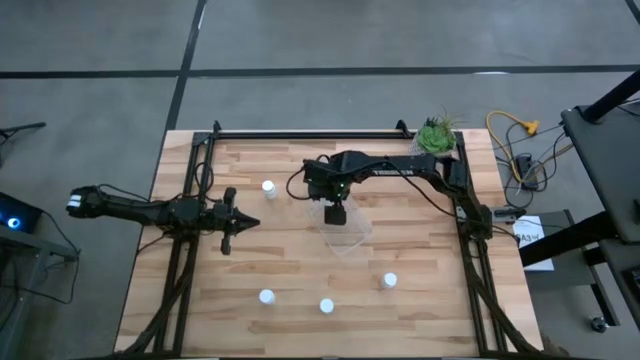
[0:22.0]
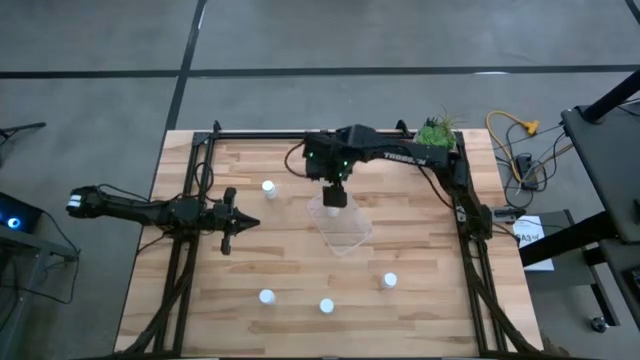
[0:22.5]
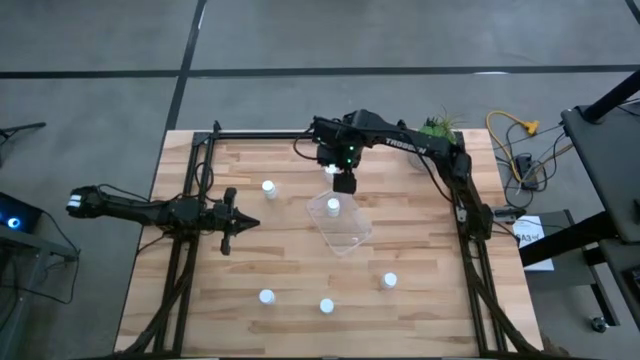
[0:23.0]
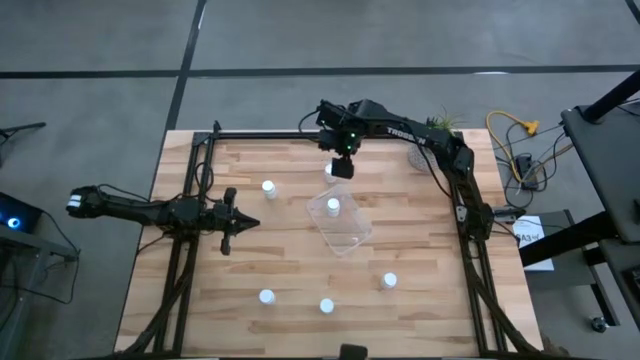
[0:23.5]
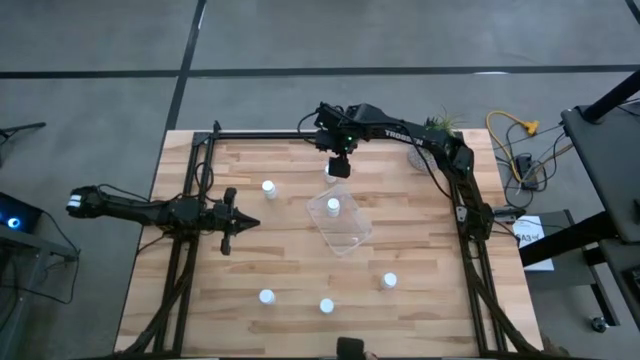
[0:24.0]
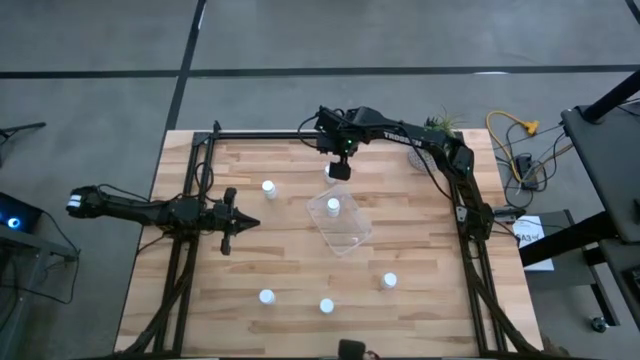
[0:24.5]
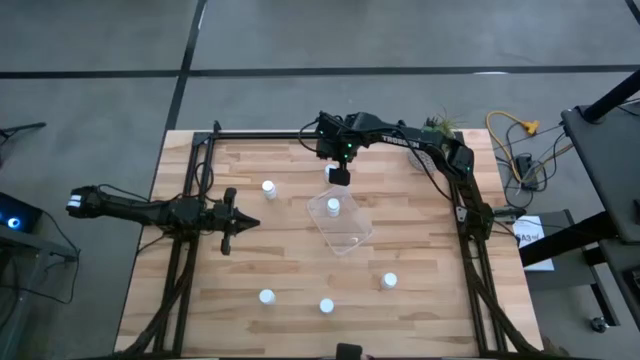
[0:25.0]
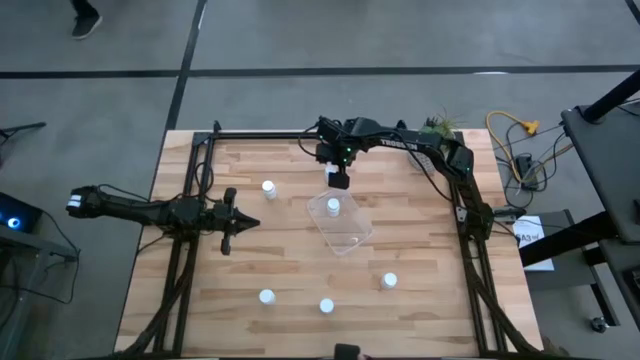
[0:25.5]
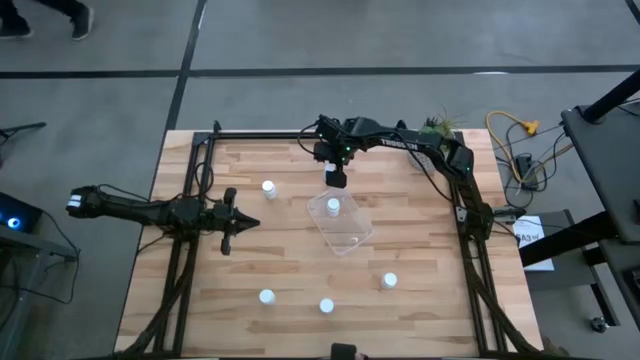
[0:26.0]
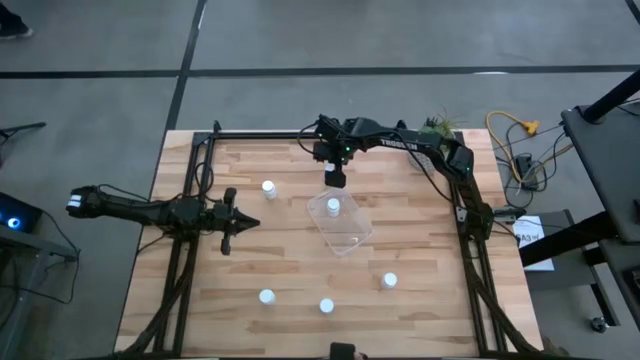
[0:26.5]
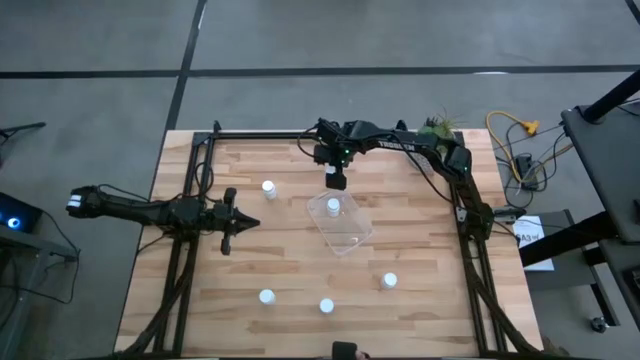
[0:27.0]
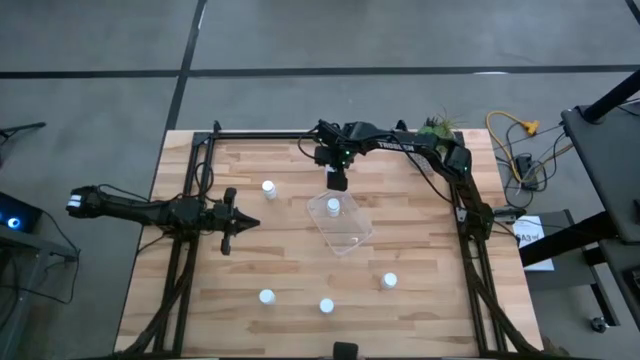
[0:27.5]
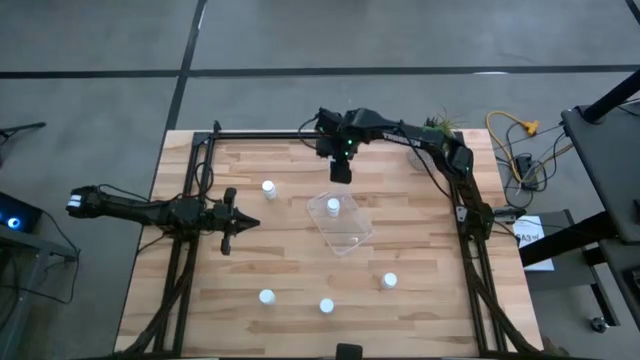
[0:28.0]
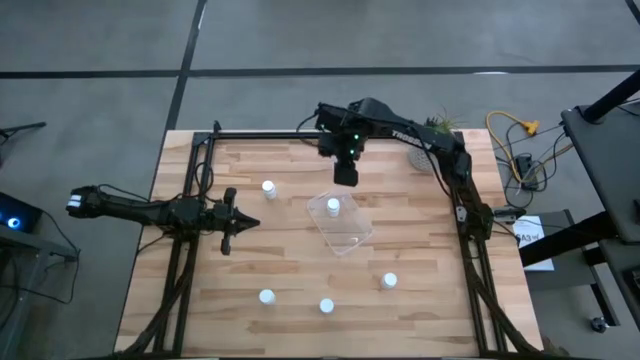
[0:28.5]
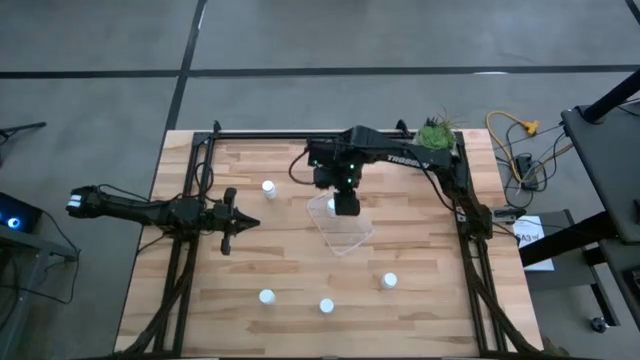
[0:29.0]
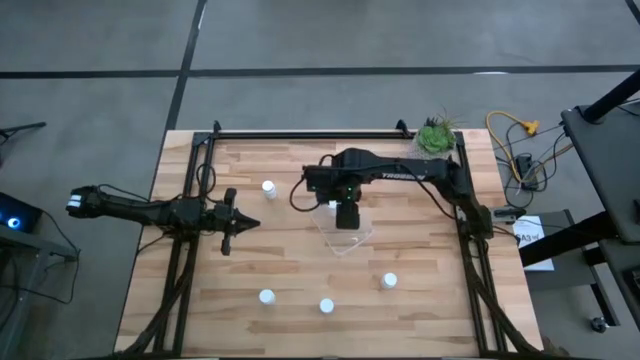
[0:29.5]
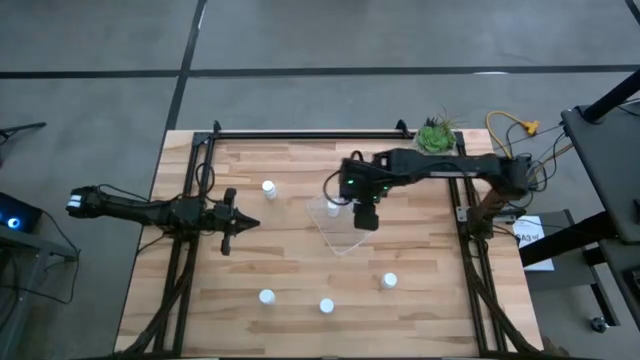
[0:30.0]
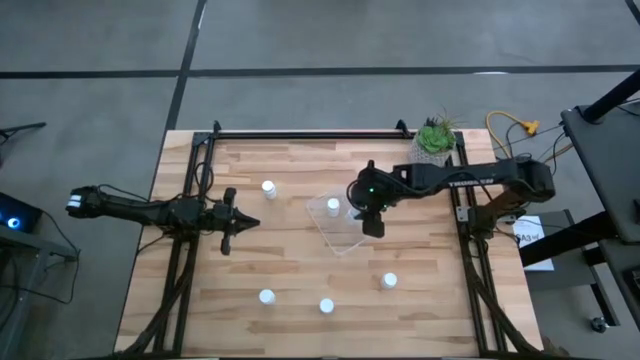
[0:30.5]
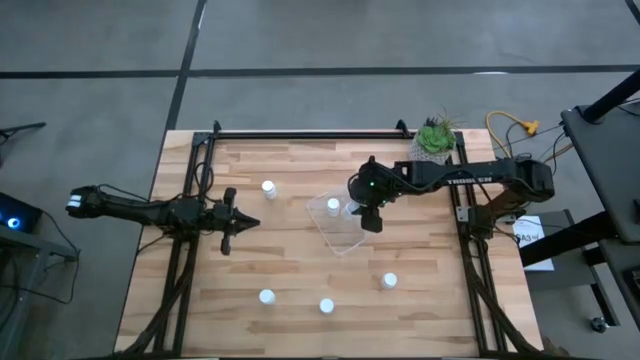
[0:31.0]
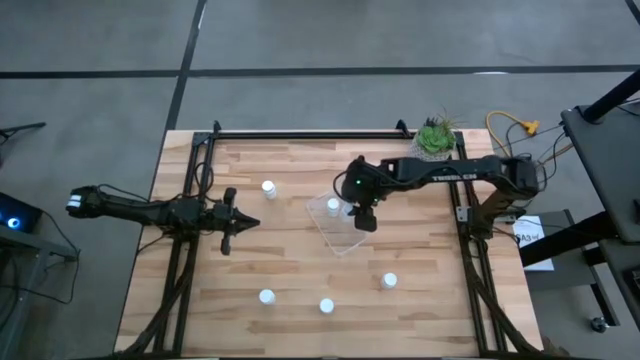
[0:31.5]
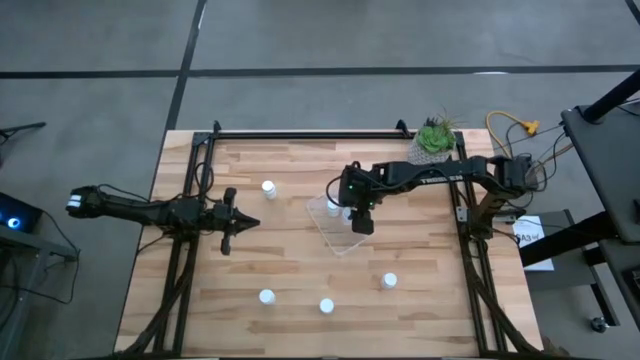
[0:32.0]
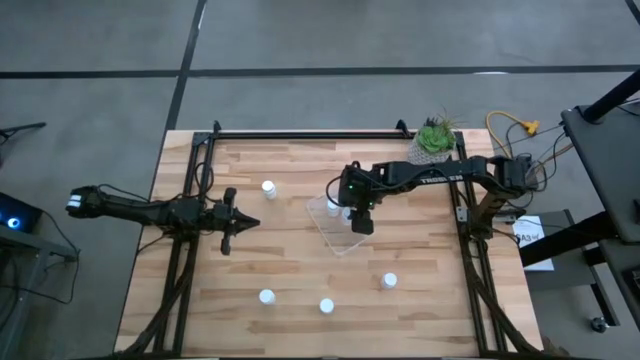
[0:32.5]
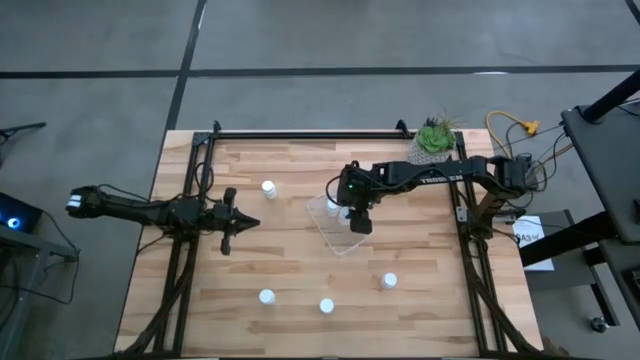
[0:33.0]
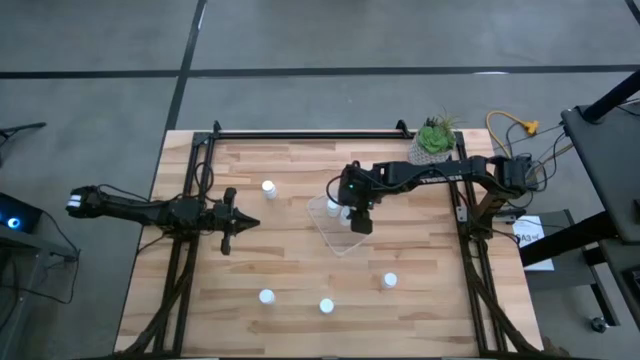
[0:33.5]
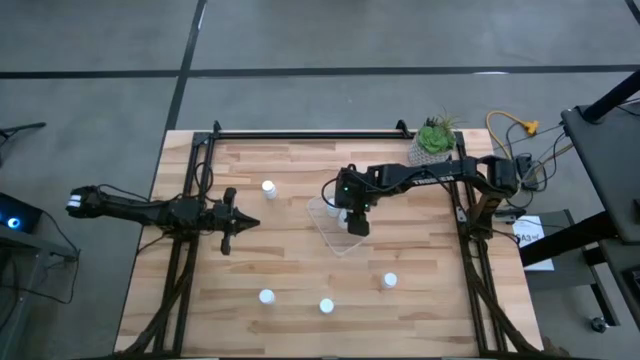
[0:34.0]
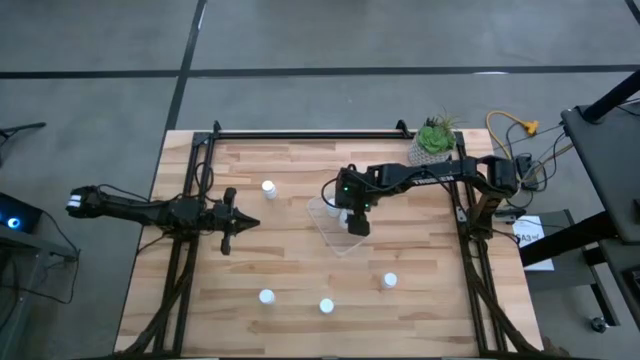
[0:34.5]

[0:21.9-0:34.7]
Task: Pick and place pill bottles into a basket
Put the white pill bottle into the transparent bin

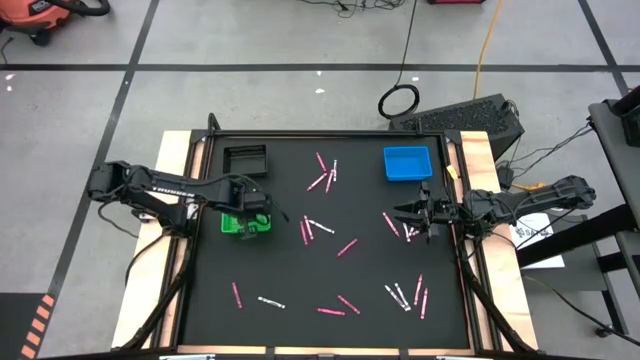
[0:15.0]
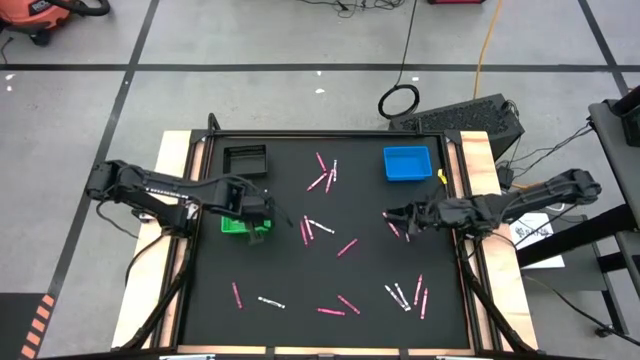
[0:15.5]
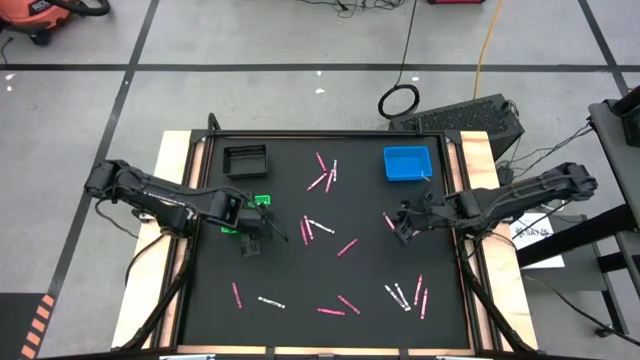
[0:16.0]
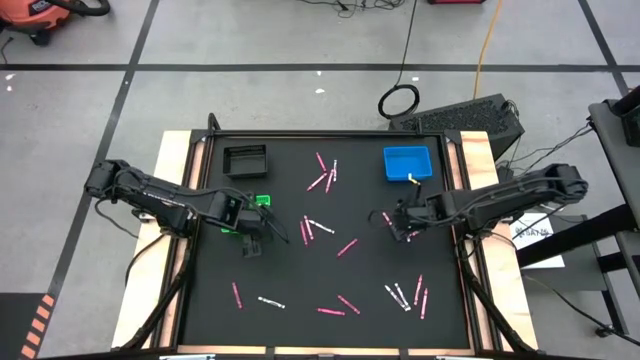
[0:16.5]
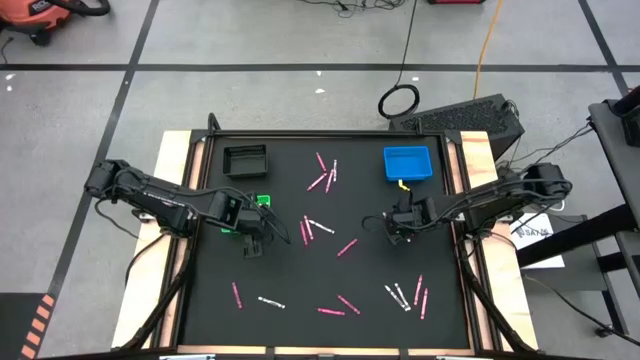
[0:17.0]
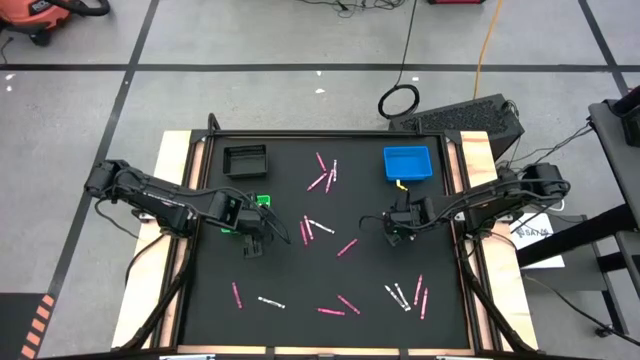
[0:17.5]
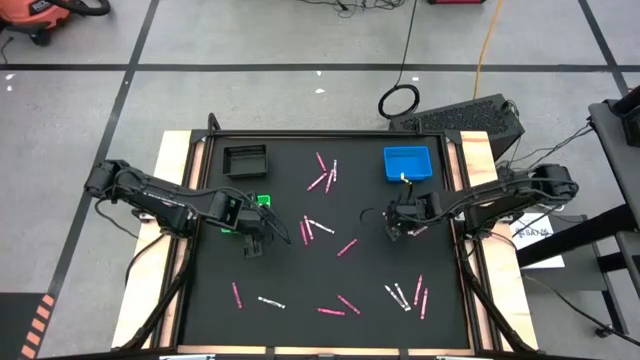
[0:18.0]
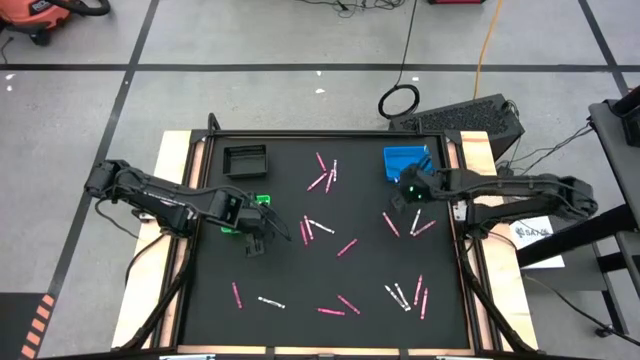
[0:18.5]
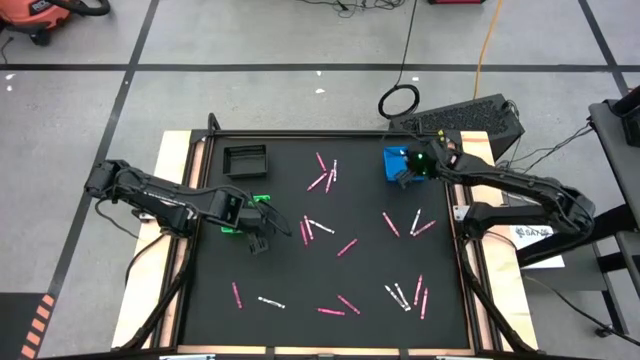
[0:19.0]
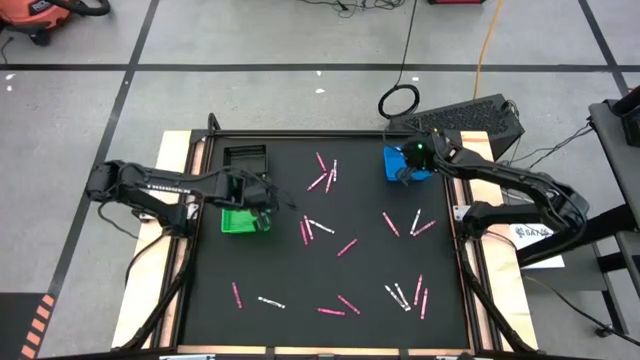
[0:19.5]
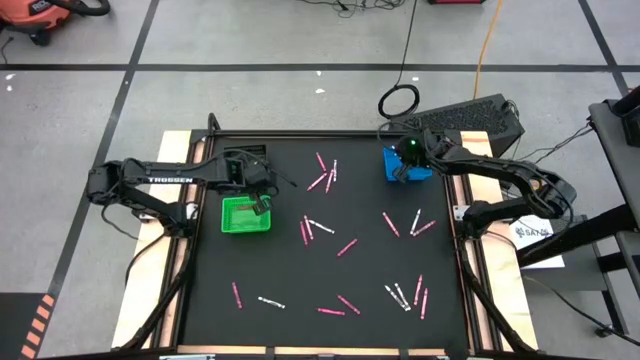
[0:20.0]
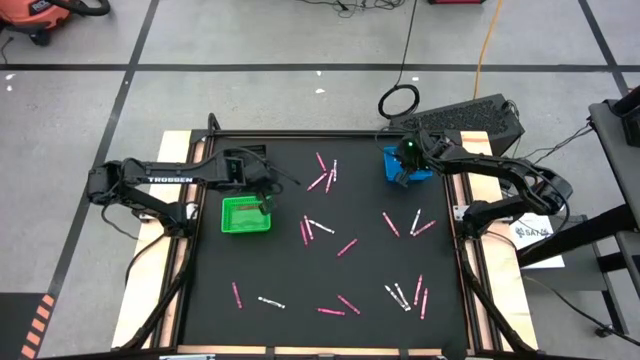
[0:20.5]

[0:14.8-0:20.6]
Task: Sort crayons
Put the white crayon into the blue bin

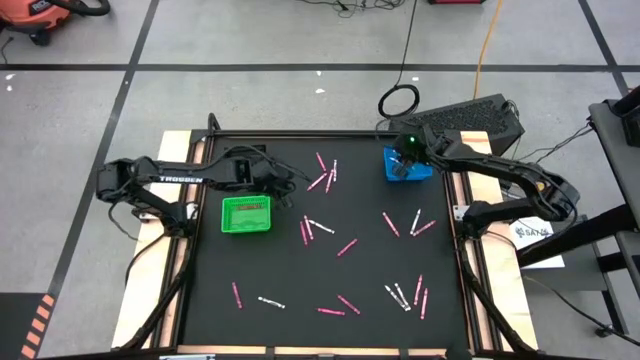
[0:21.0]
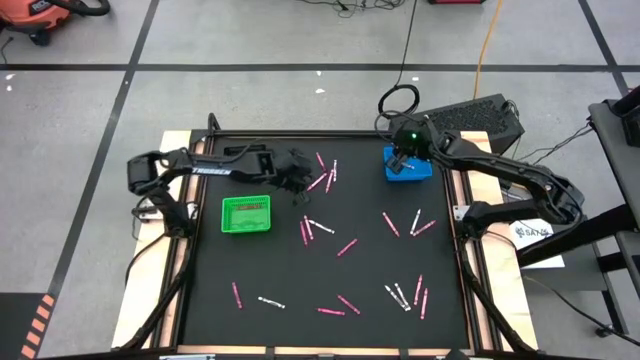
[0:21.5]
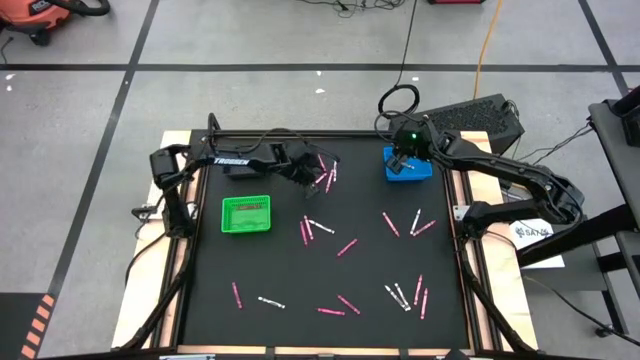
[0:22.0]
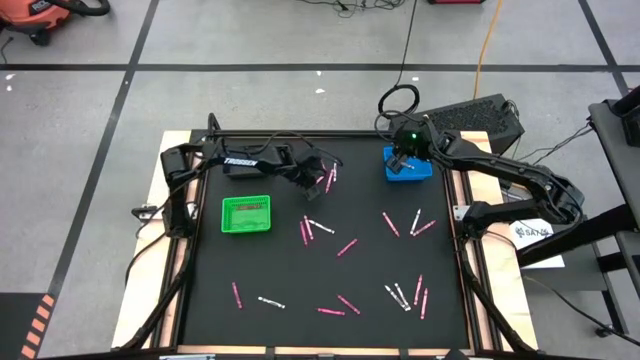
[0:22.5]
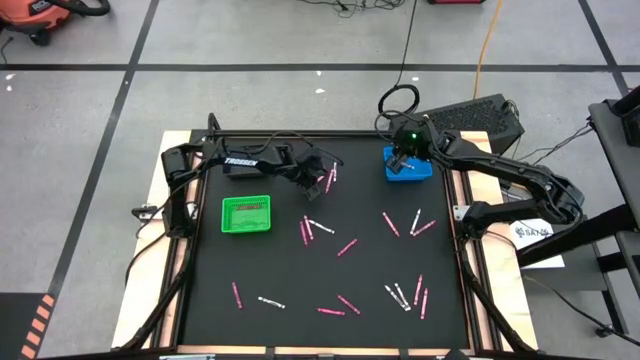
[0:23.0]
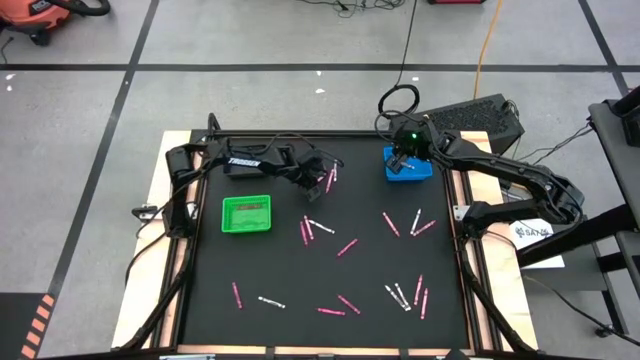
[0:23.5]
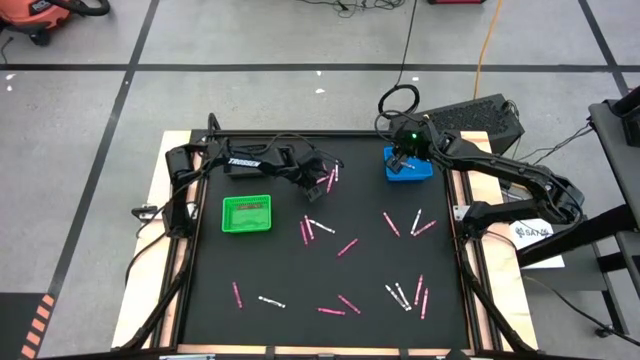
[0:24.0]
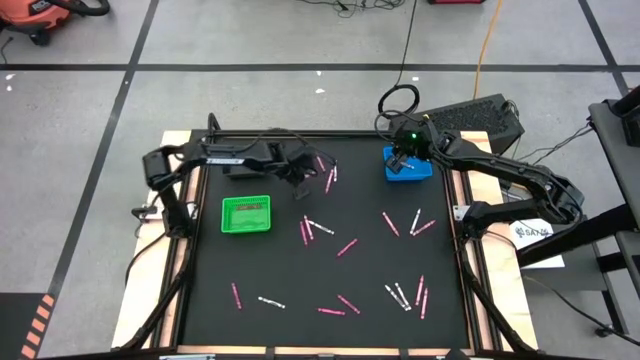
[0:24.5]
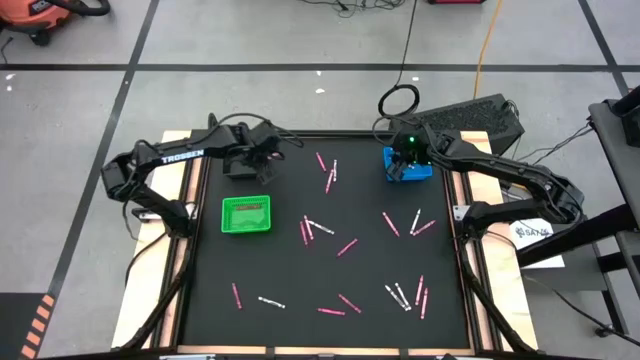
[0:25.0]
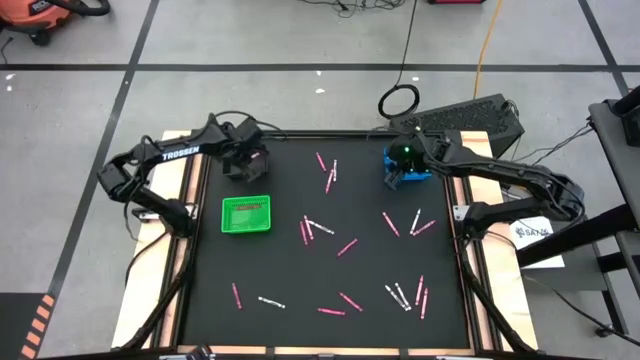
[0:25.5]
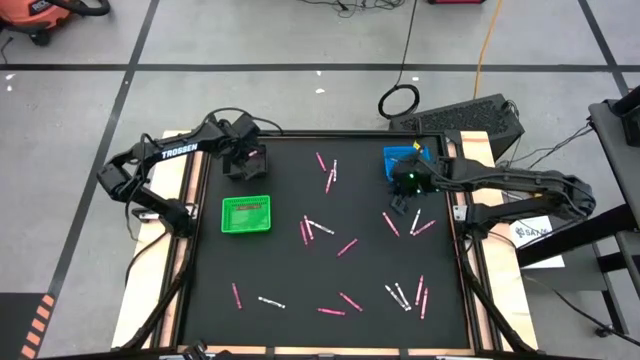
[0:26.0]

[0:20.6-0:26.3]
Put the pink crayon into the black bin
